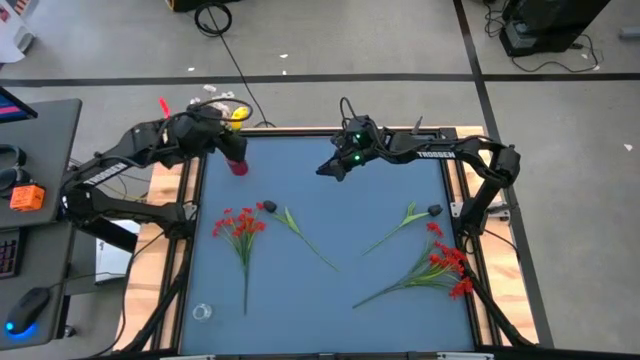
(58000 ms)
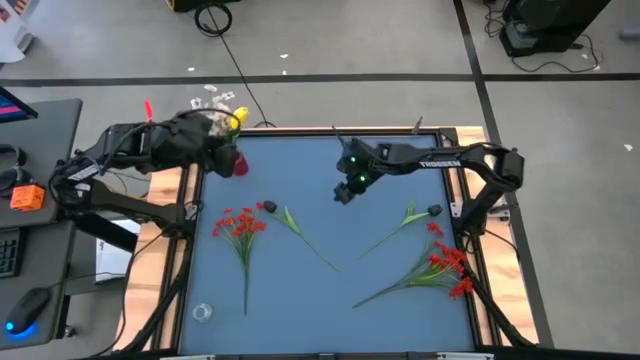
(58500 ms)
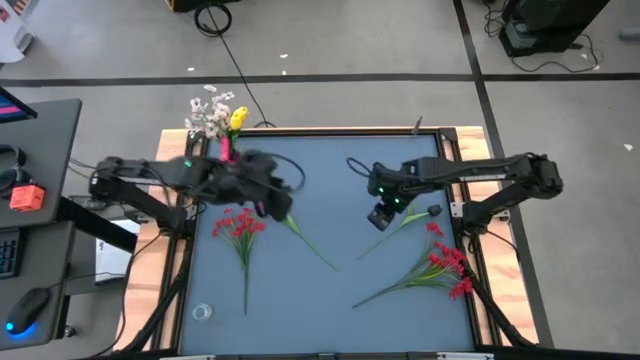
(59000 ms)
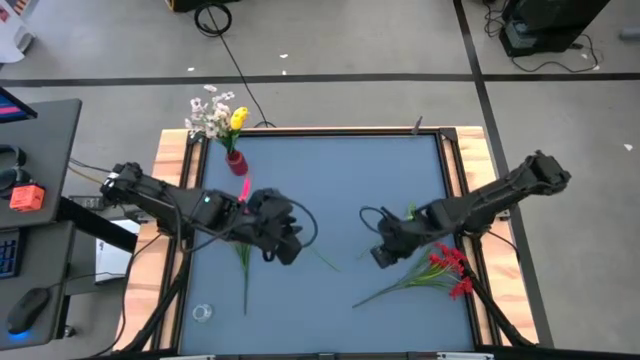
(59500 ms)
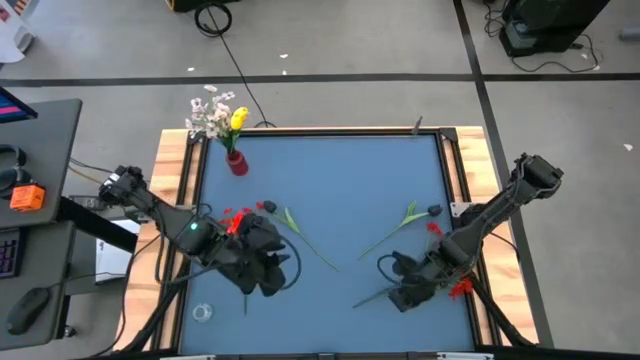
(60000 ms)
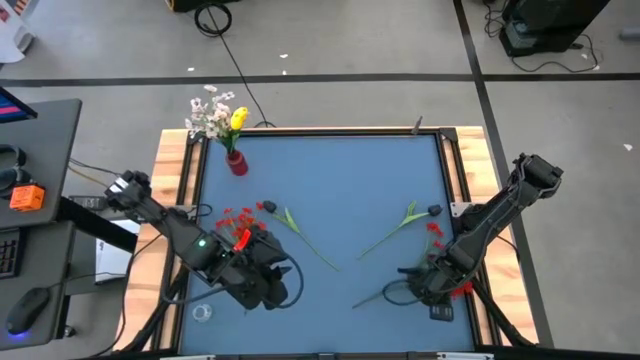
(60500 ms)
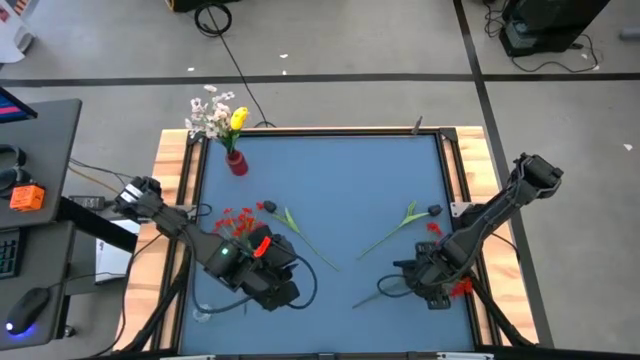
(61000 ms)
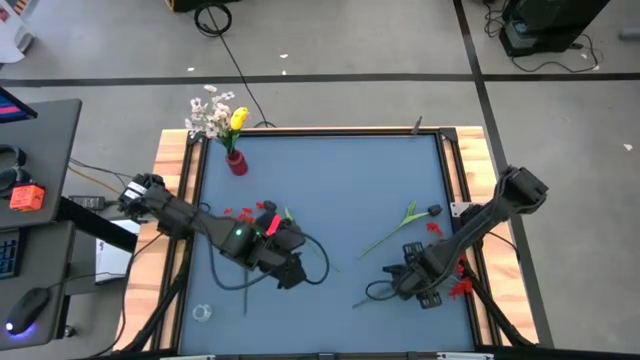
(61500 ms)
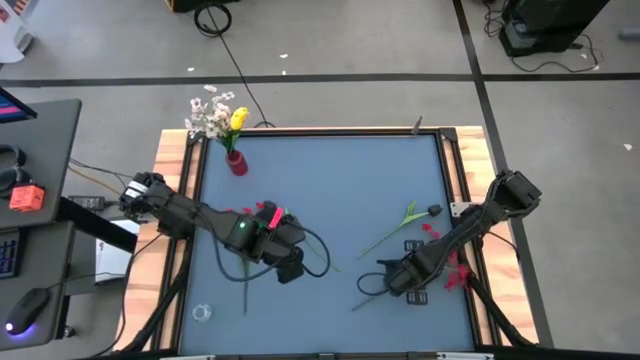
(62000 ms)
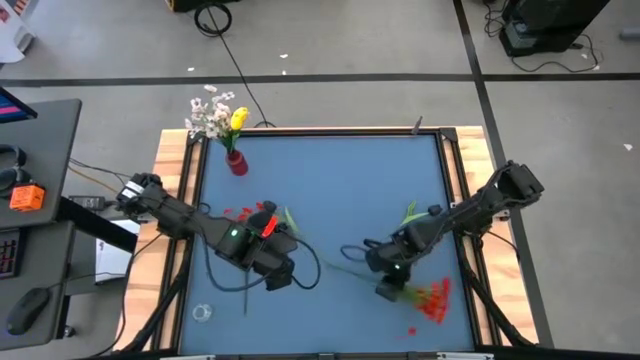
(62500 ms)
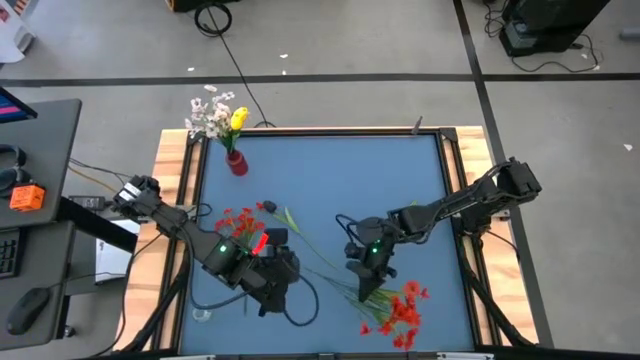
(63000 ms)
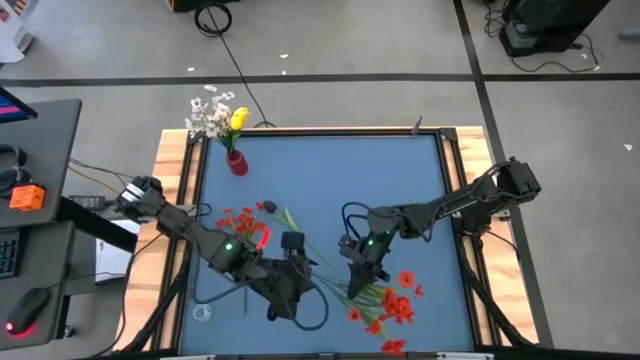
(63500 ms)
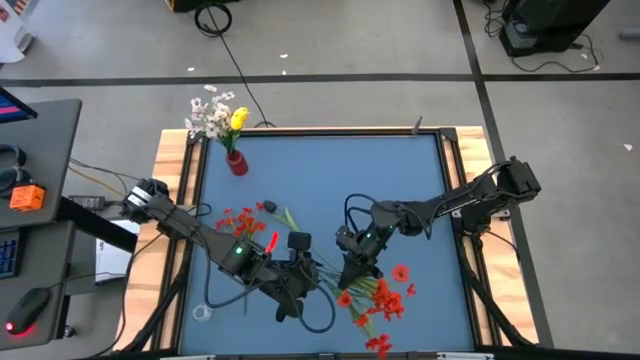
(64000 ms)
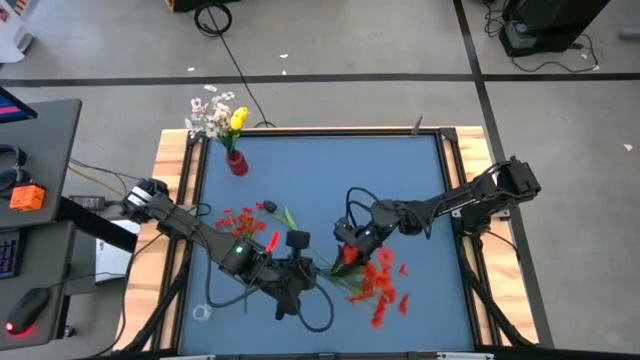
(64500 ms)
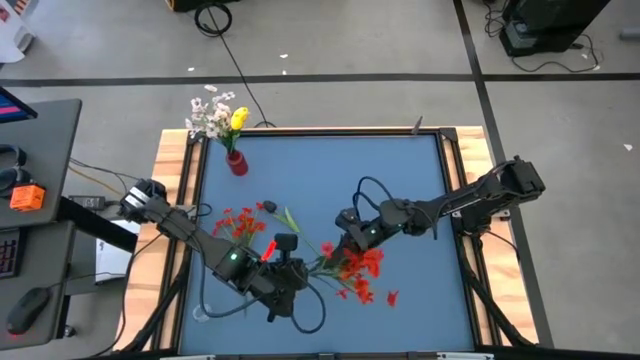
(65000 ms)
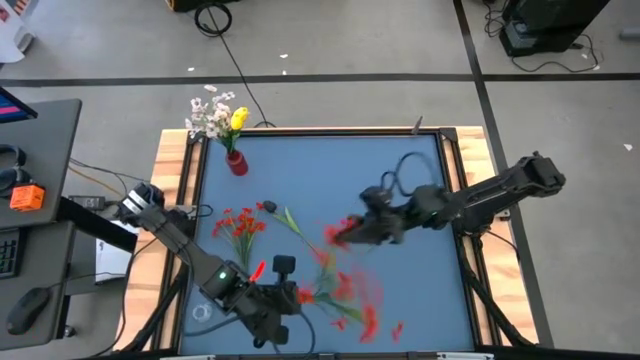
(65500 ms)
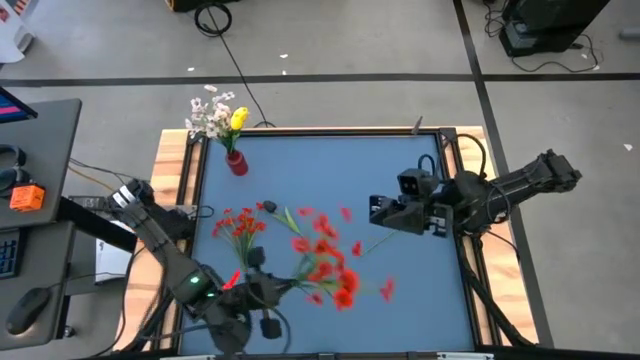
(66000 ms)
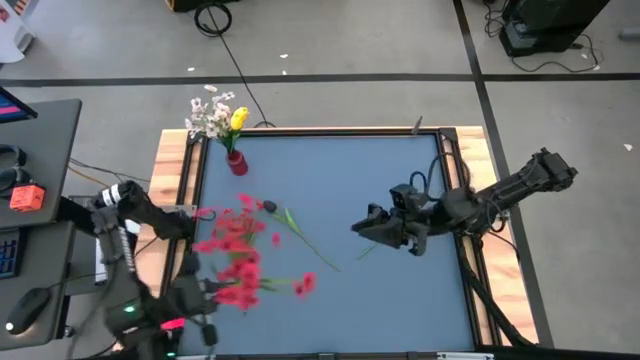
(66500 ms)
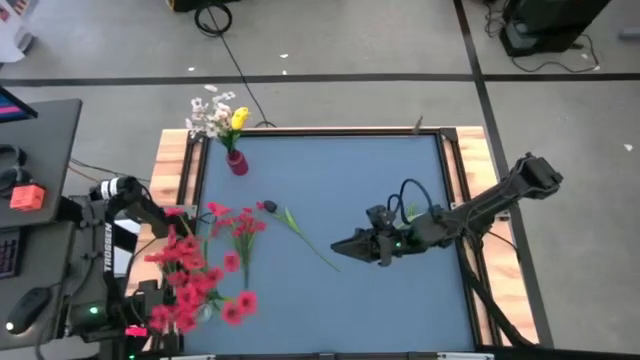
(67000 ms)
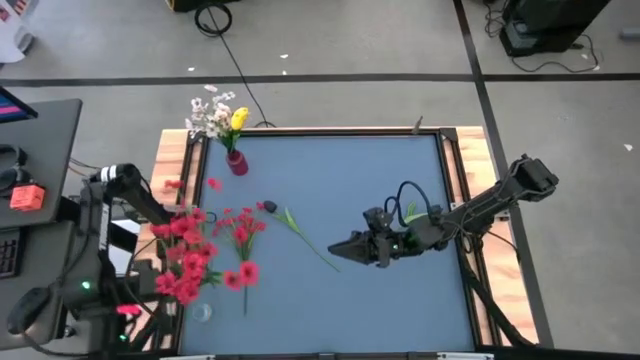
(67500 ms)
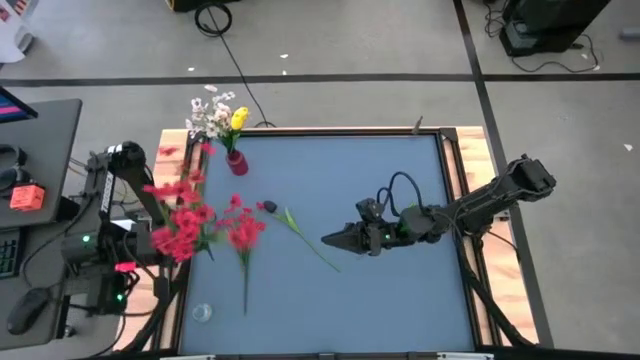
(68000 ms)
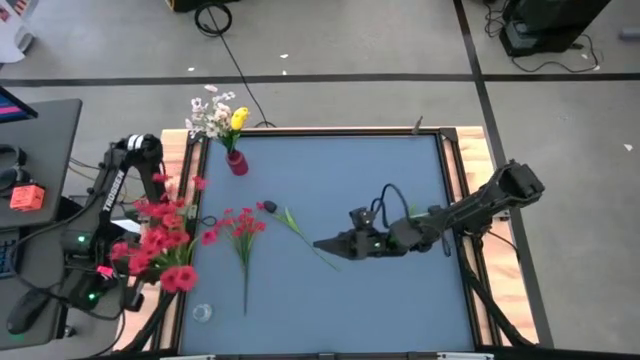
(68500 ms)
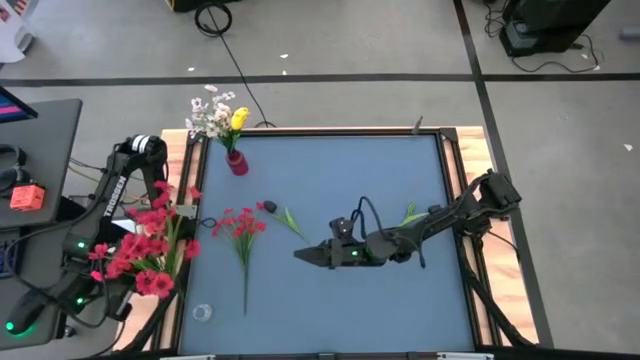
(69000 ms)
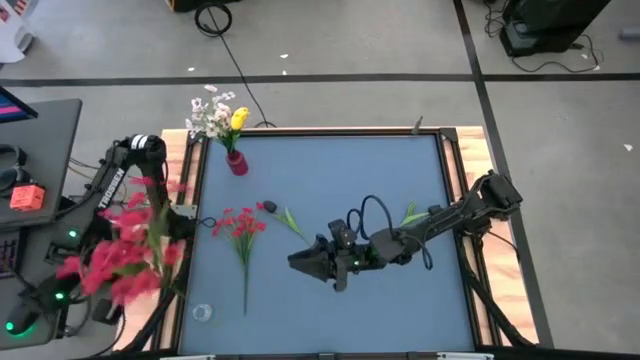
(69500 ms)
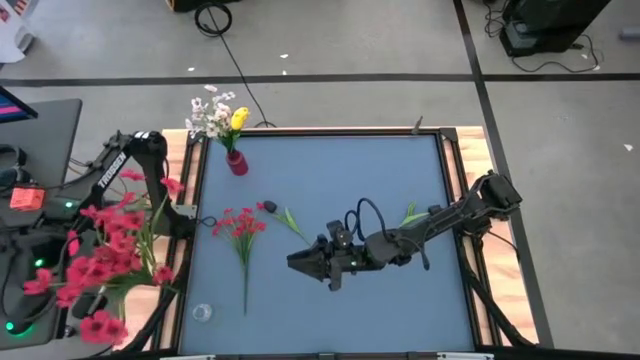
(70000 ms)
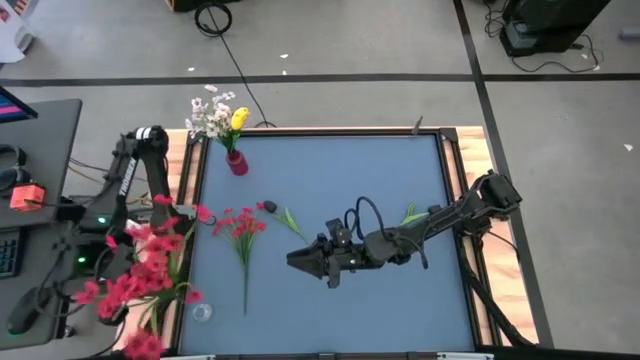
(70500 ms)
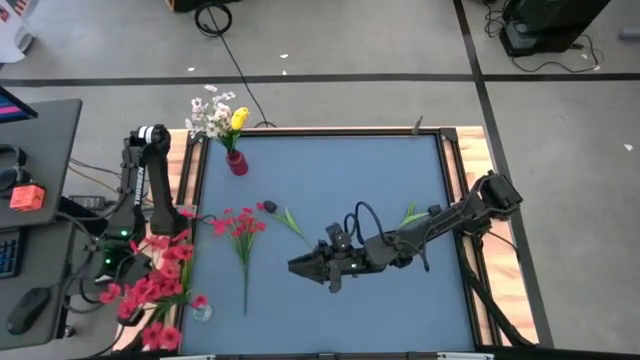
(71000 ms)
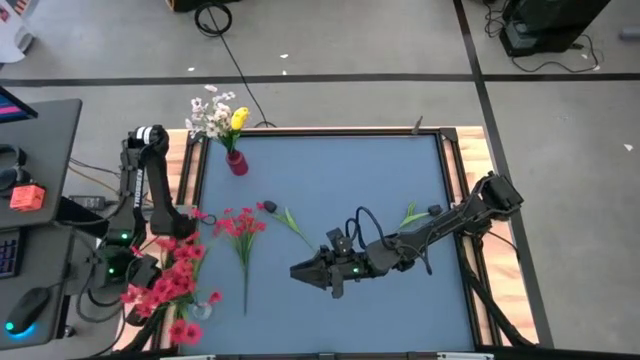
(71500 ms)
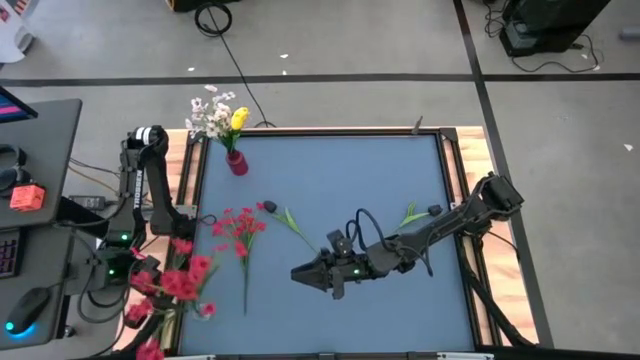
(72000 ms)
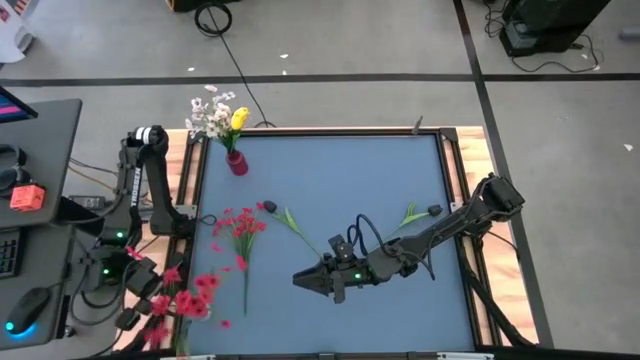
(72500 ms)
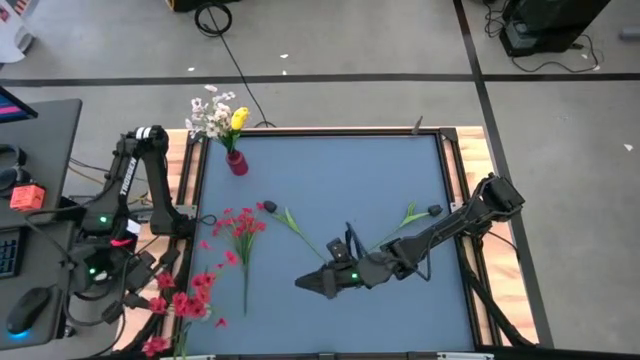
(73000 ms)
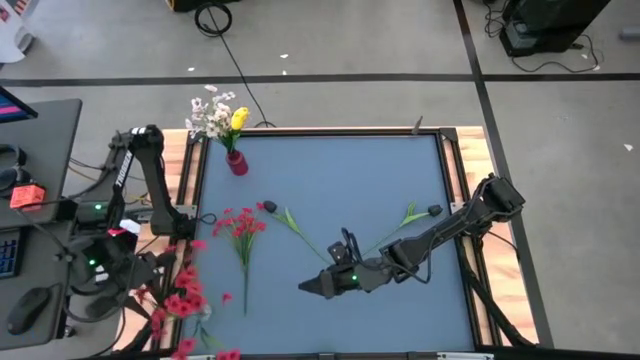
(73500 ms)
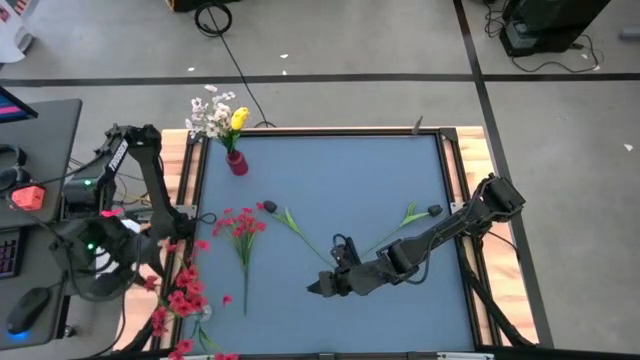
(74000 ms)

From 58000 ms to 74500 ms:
Task: Sort flowers into vase by color
Put the right red flowers into the transparent vase

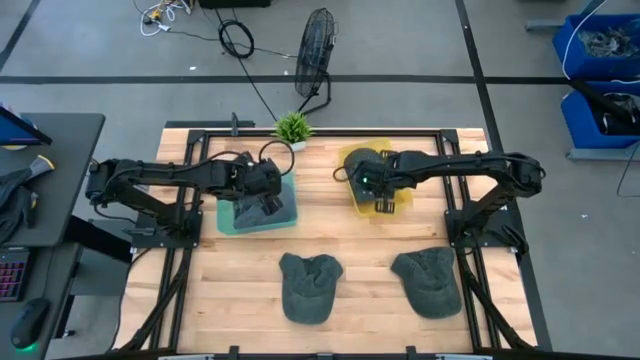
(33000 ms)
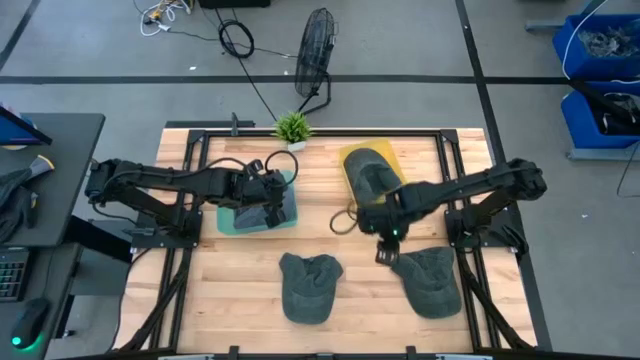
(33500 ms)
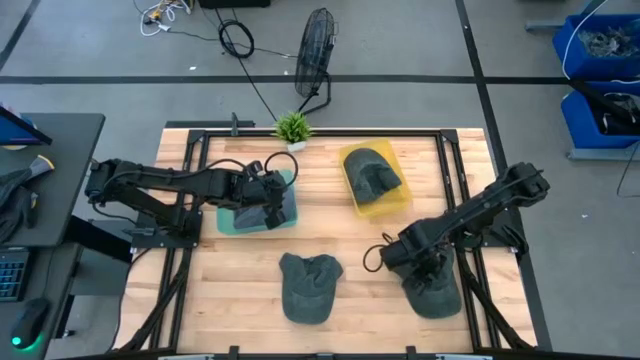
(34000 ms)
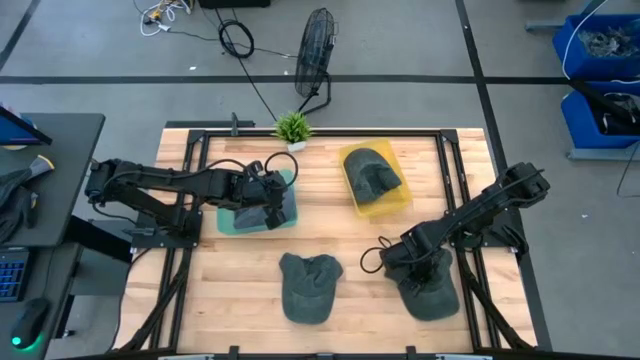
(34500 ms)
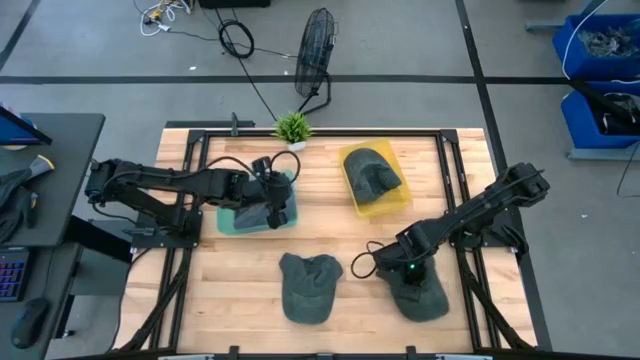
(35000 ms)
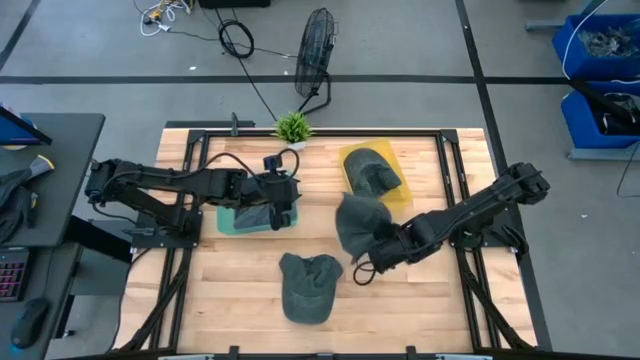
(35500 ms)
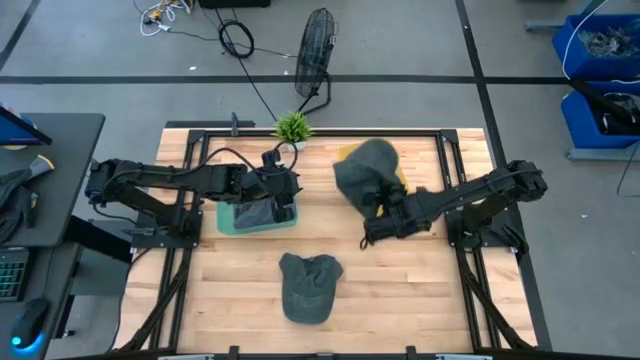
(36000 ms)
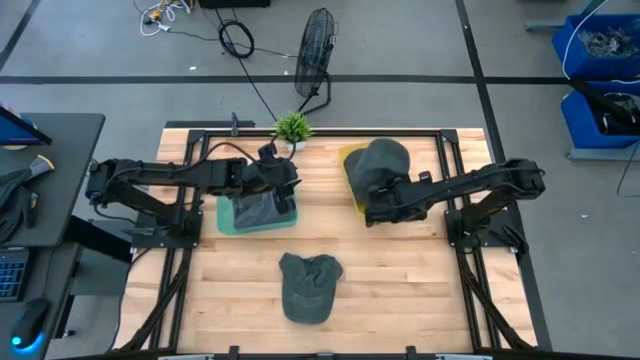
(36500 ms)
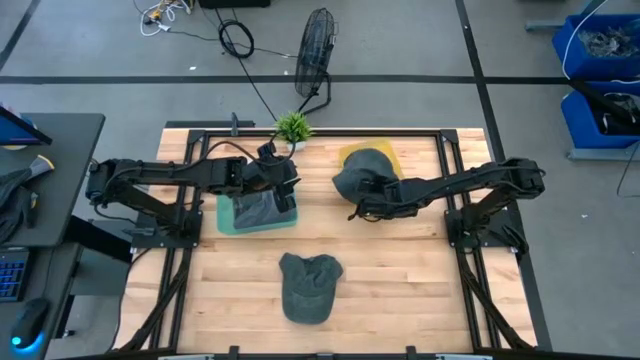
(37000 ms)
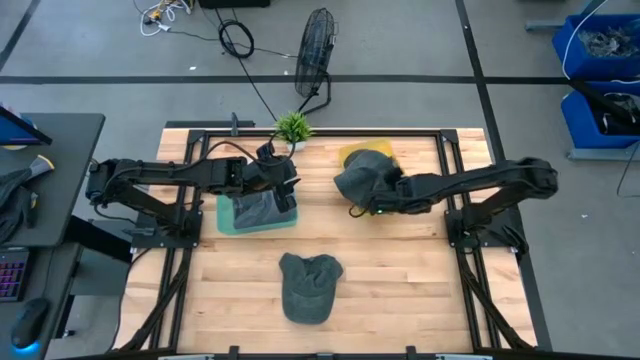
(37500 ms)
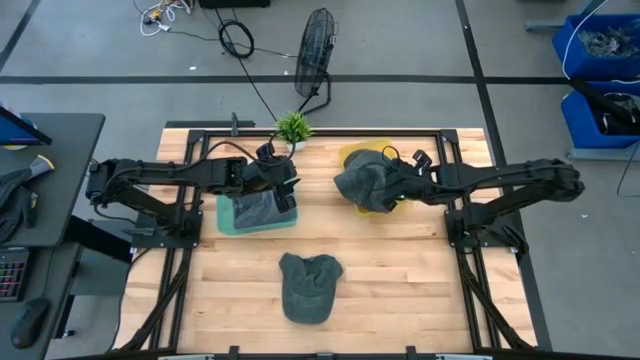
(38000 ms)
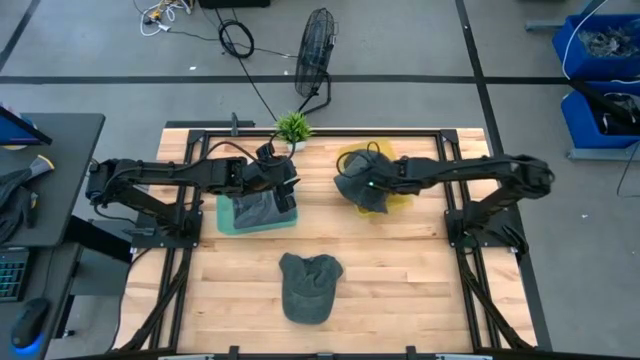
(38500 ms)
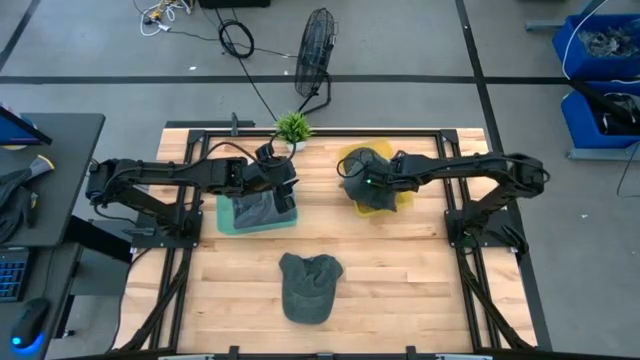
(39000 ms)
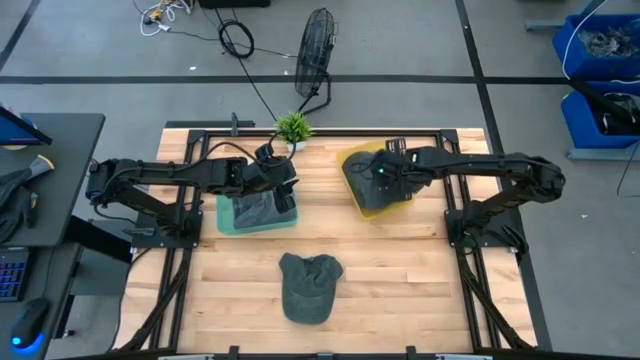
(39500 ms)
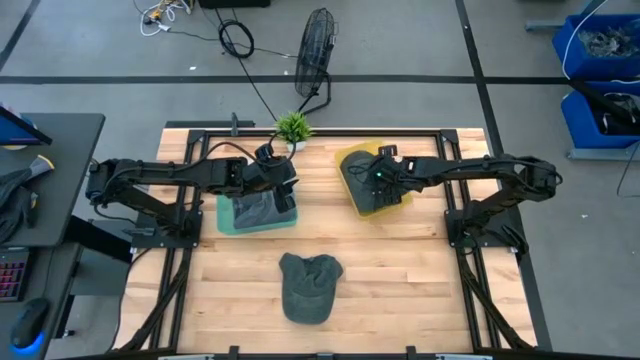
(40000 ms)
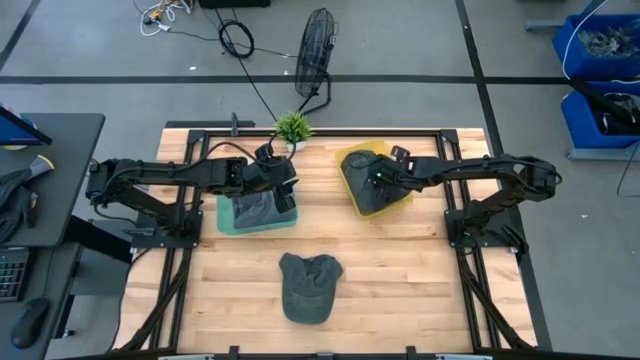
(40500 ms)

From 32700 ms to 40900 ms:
Task: Pick & Place hat
Put the right black cap into the yellow bin
